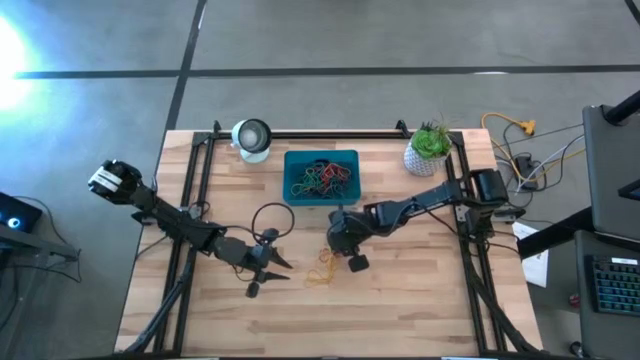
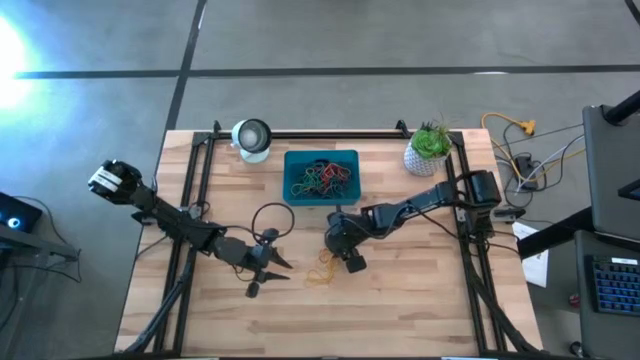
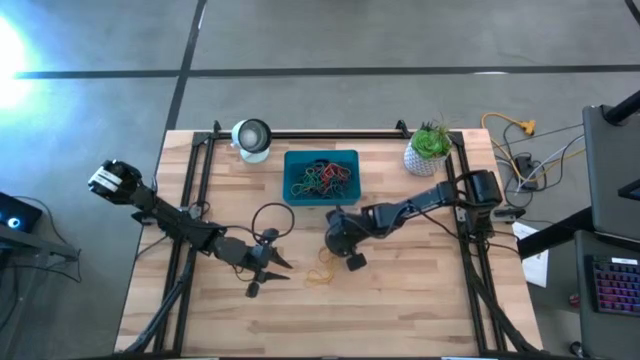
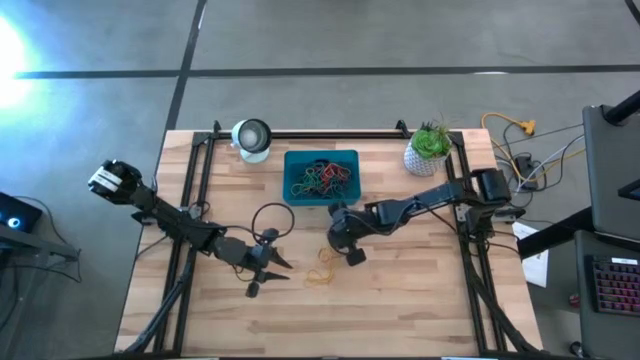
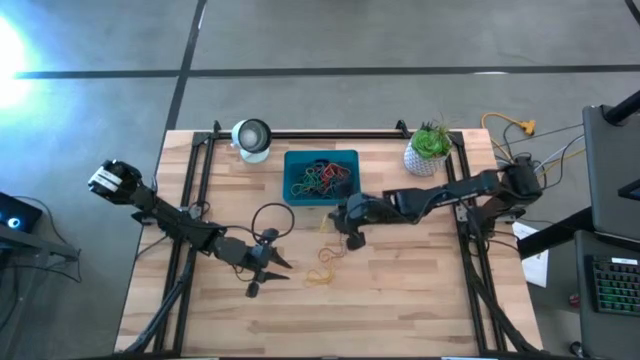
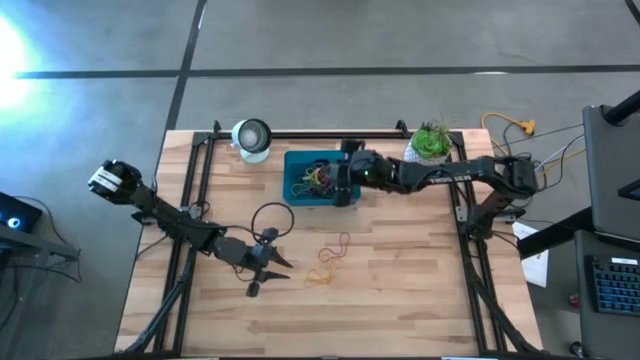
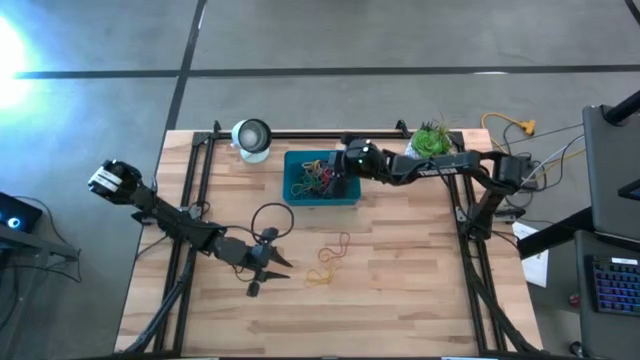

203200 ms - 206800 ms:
Task: Pick and place rubber bands into bin
Put the yellow rubber band into the bin

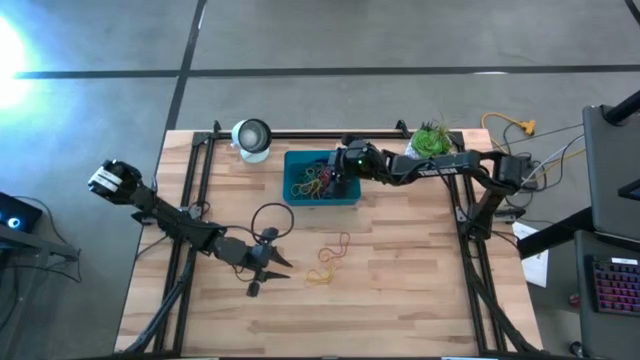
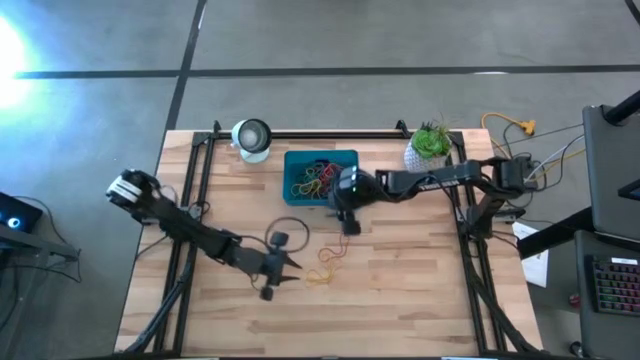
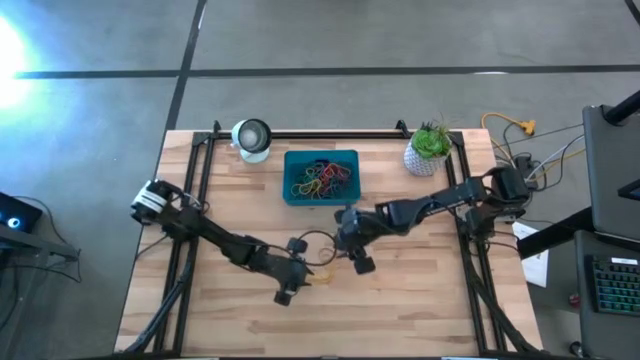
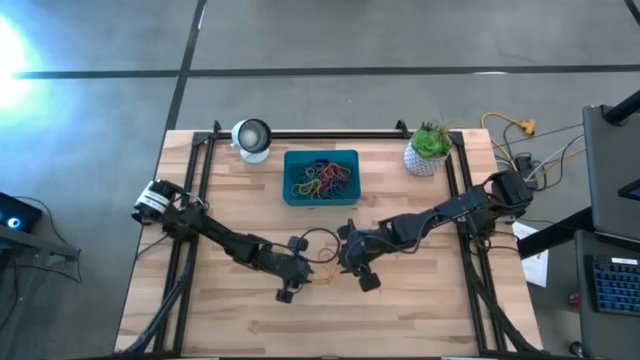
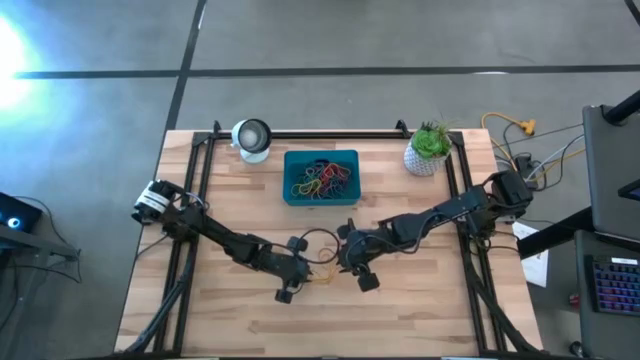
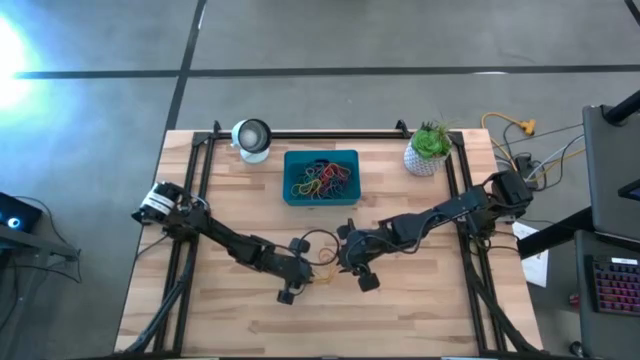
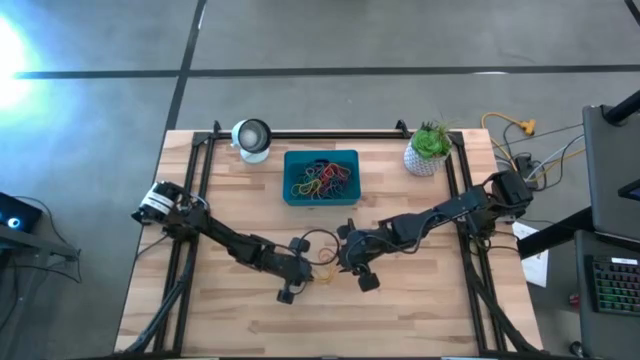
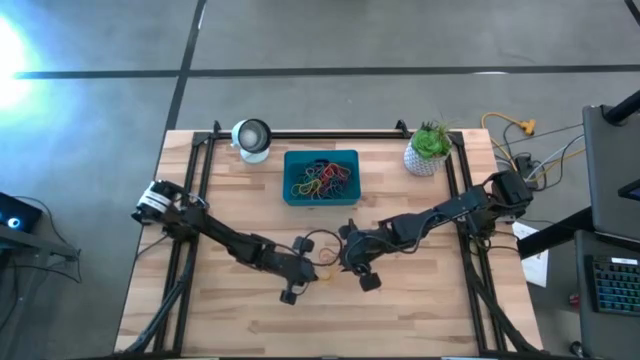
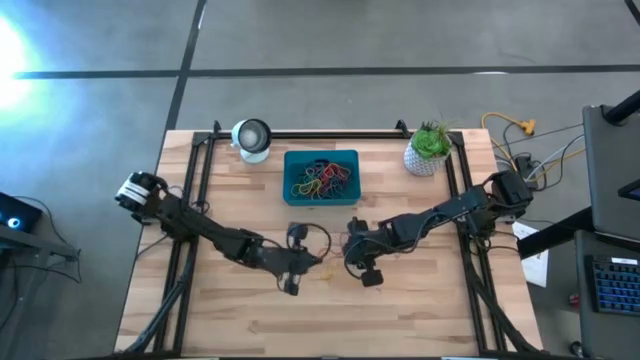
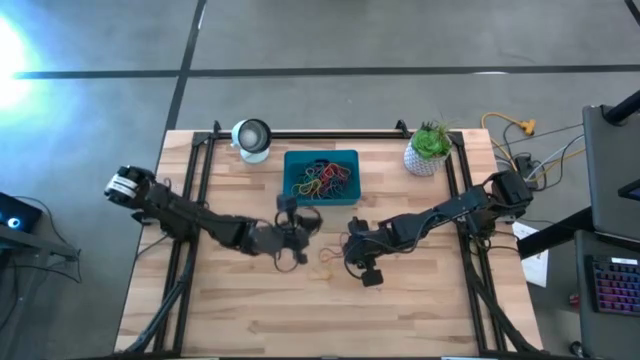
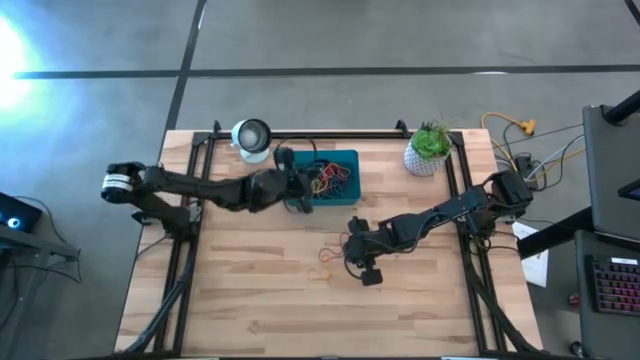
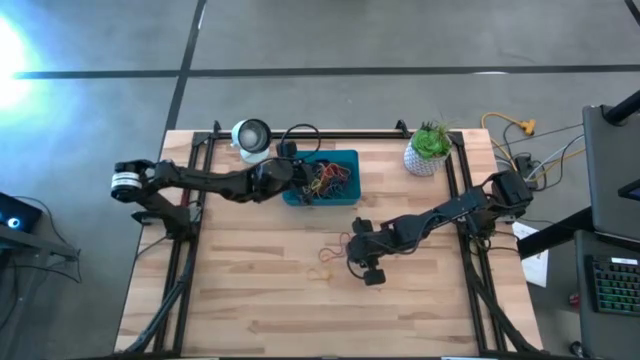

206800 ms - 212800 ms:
Put the yellow rubber band into the bin

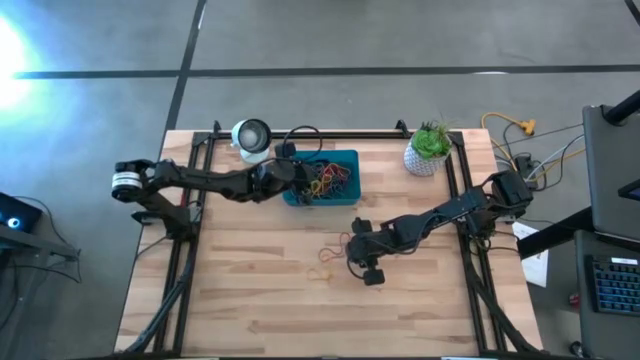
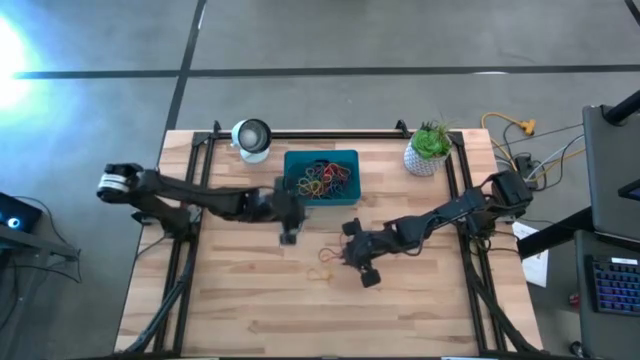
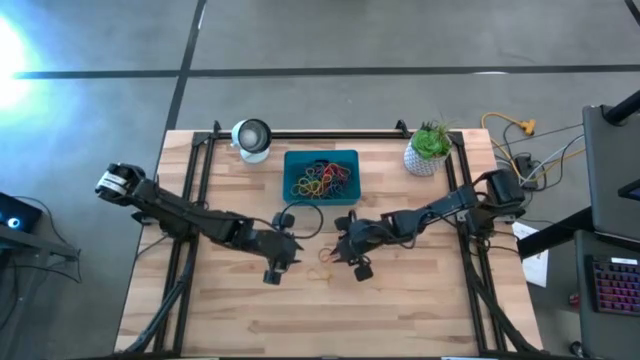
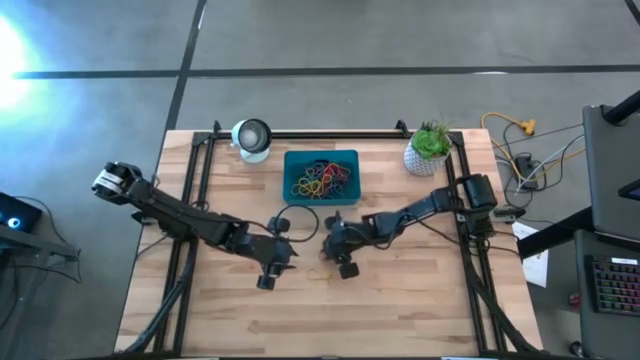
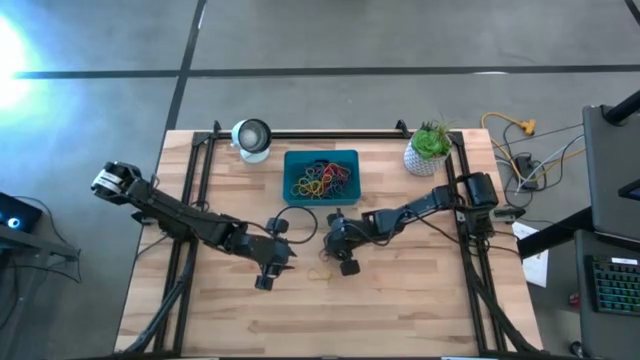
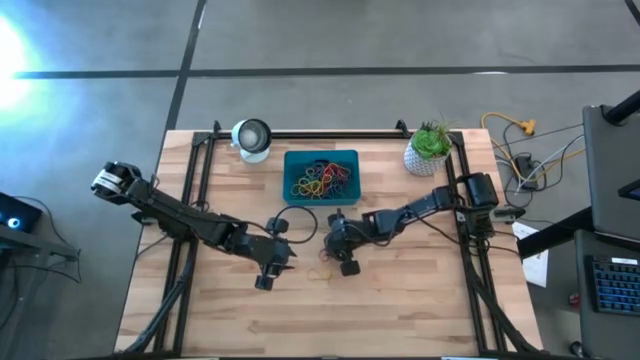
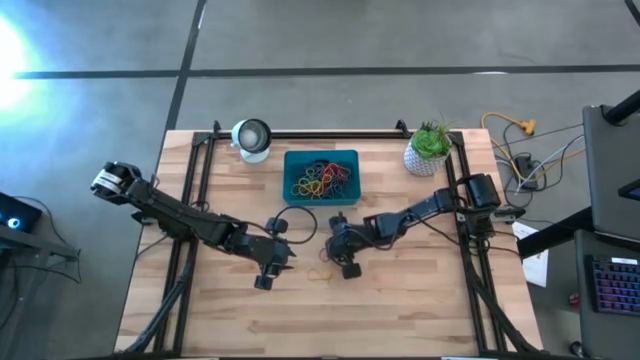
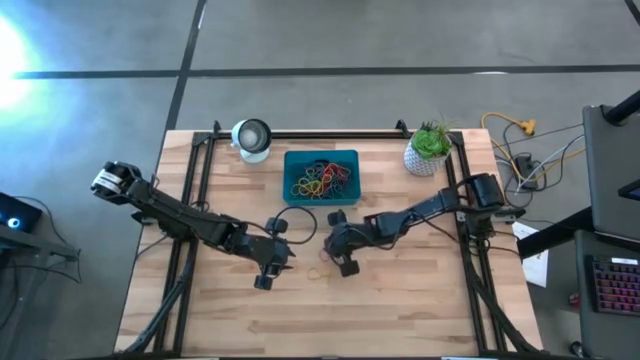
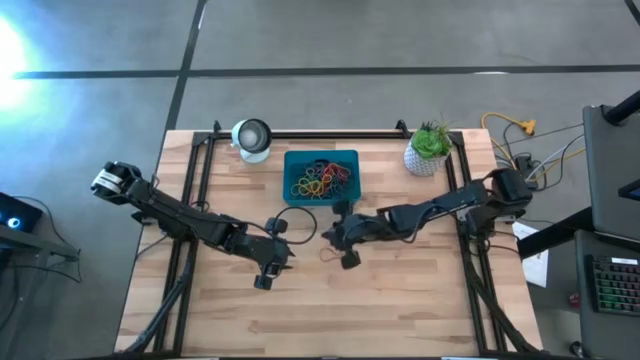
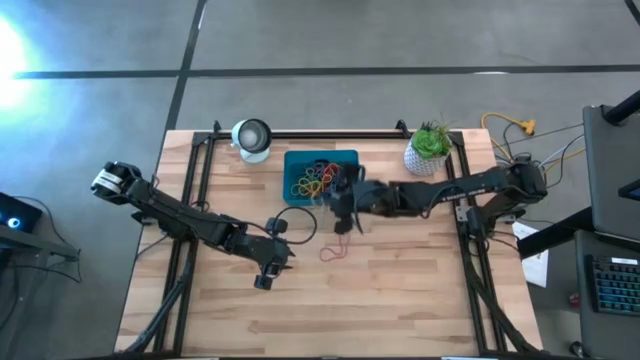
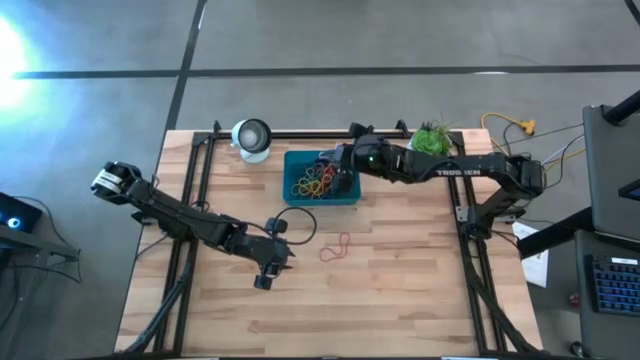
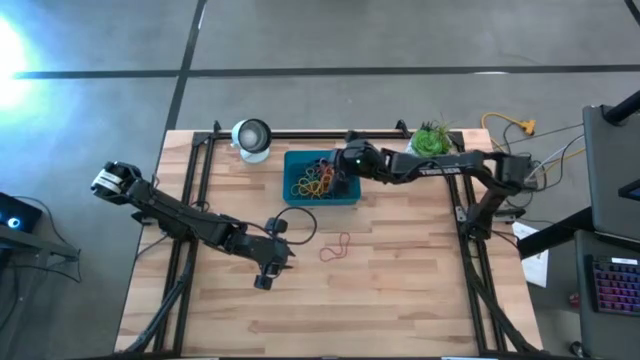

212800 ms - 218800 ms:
Put the yellow rubber band into the bin

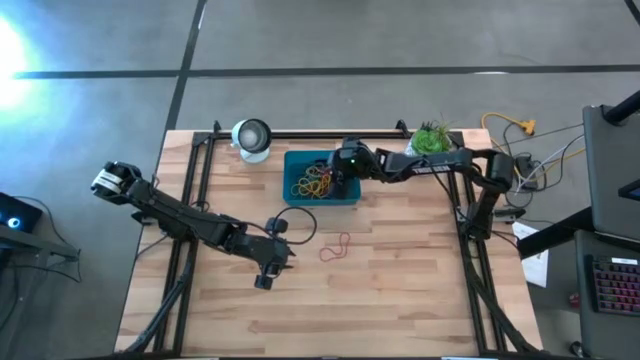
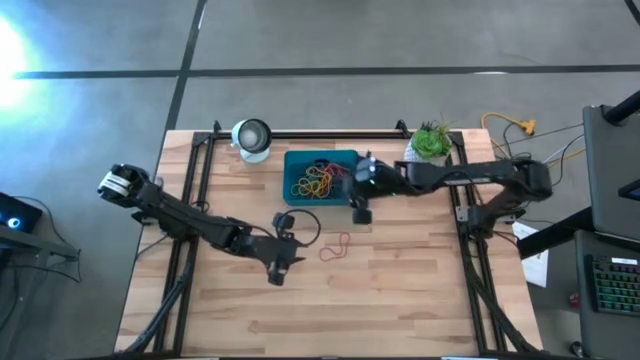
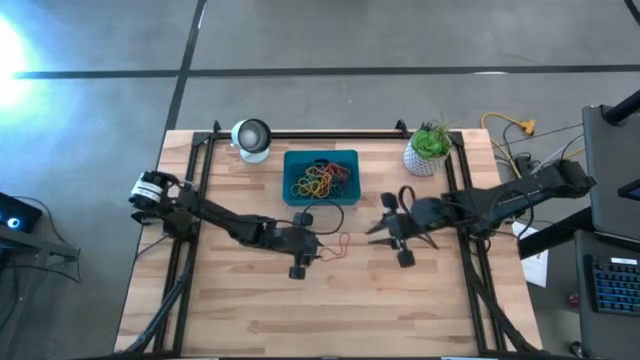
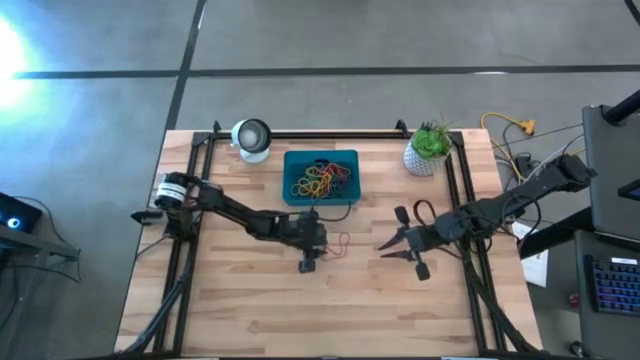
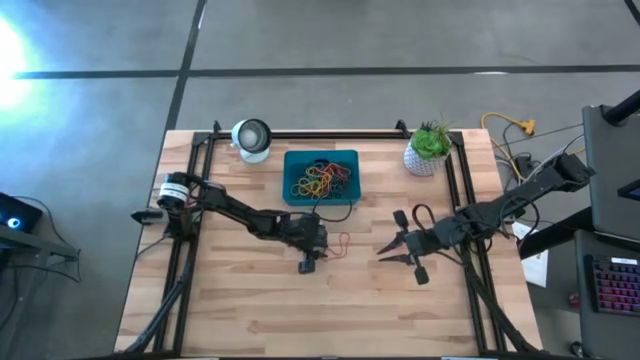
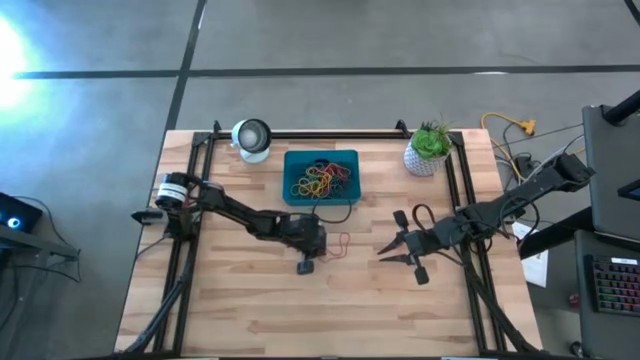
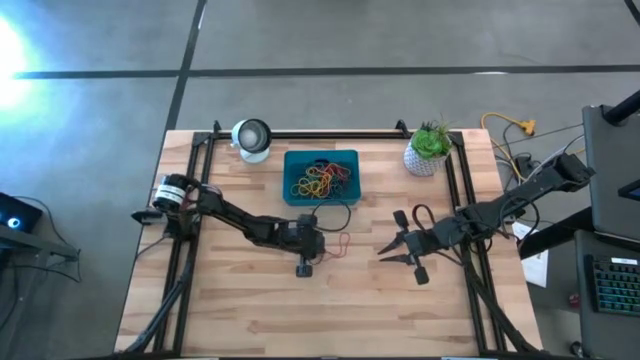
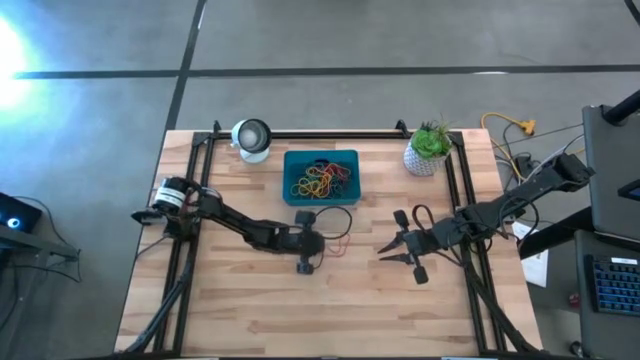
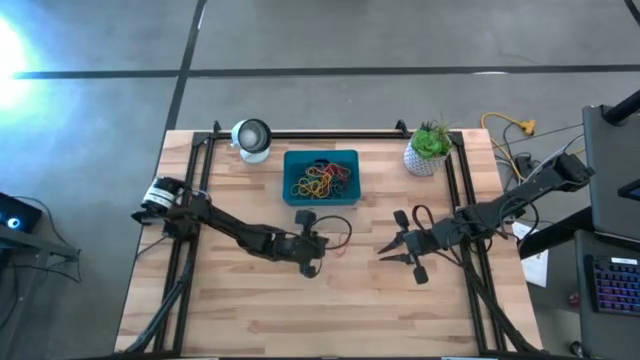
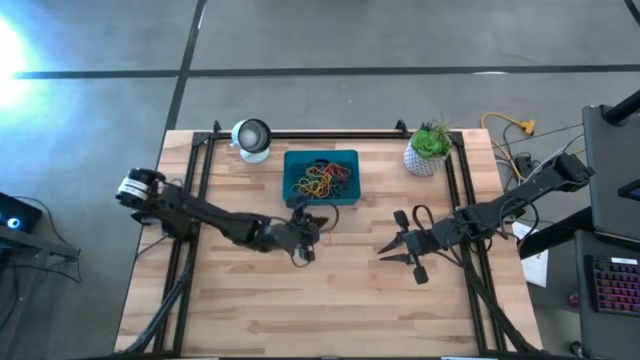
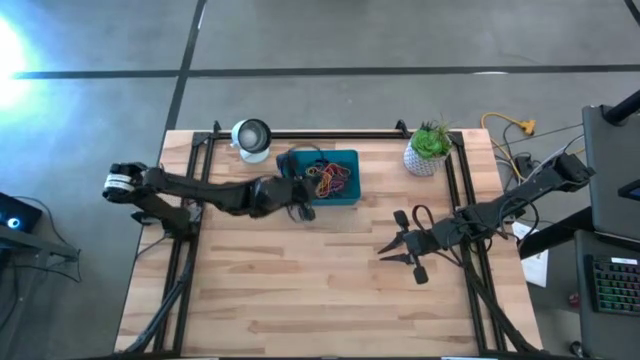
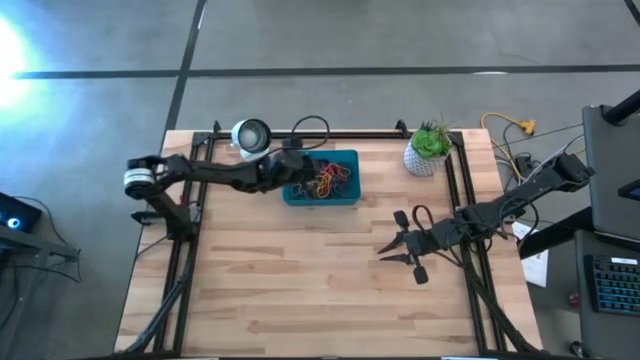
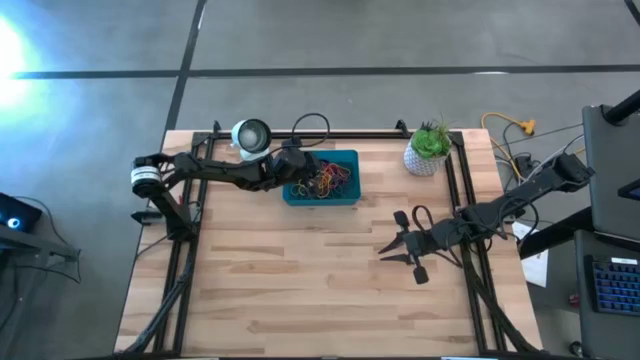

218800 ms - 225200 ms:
Put the red rubber band into the bin
